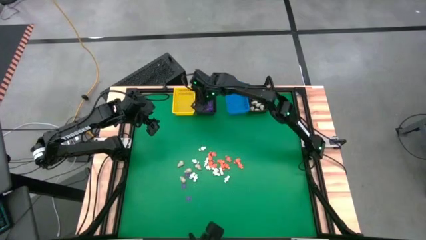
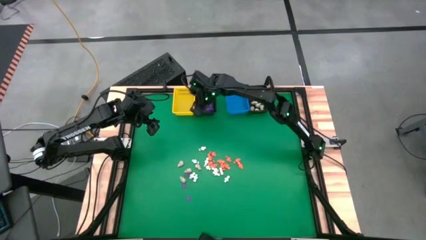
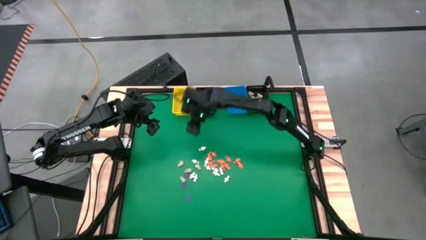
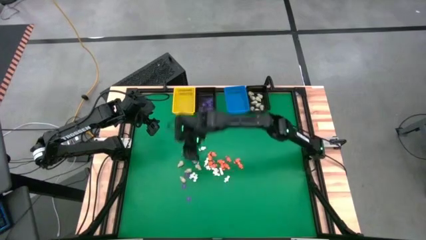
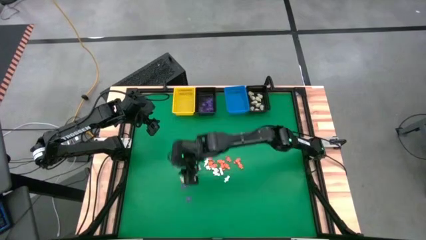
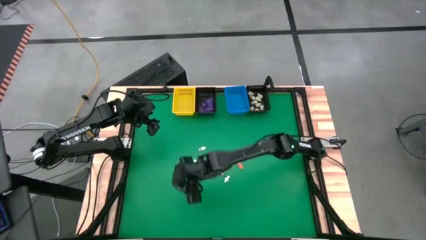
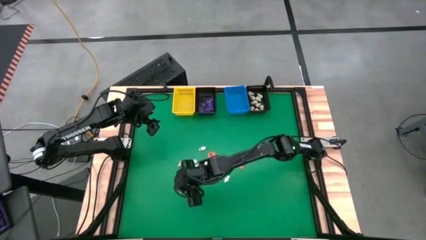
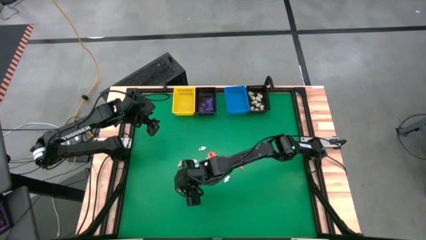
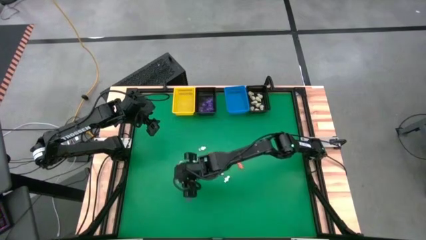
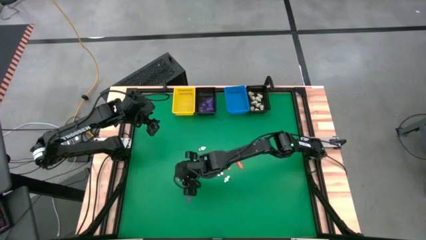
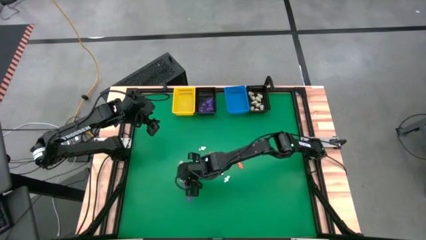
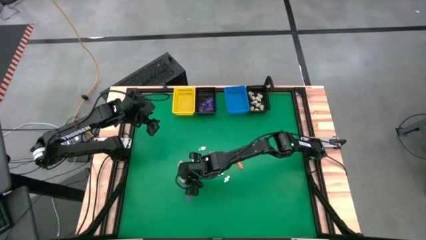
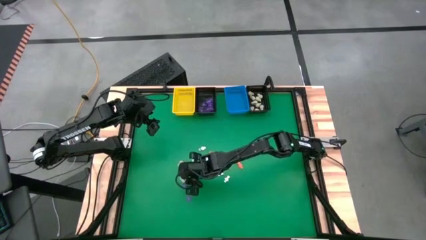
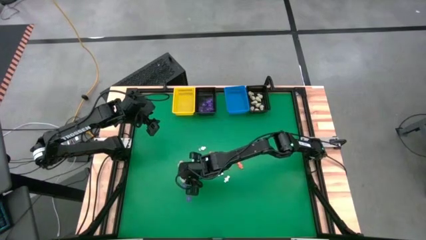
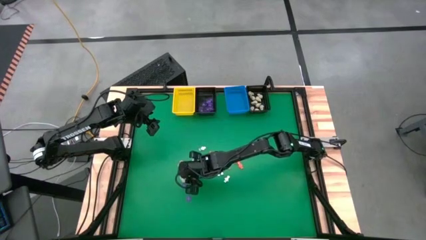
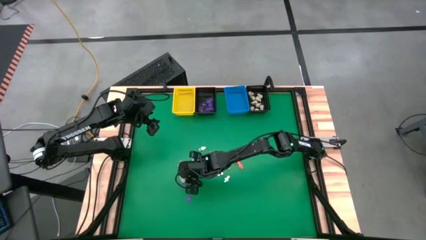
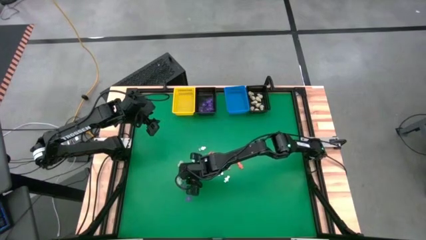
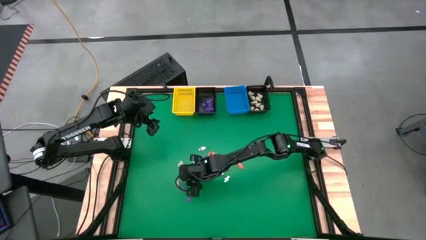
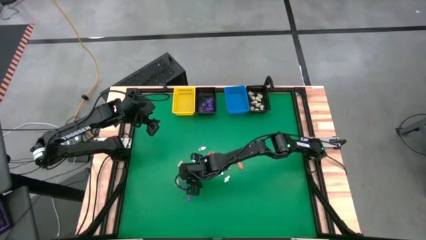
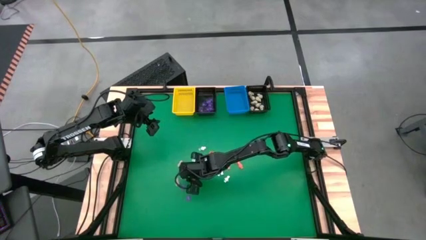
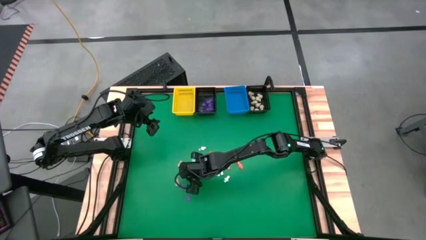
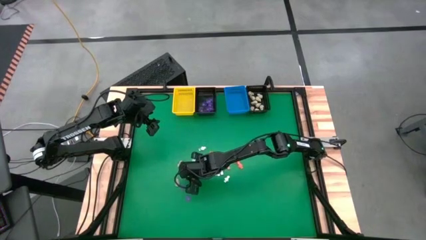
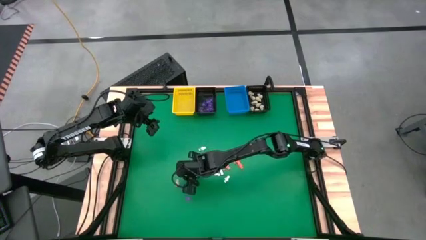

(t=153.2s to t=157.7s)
Task: Sort Halloween decoration
Put the purple spider toy into the left black basket

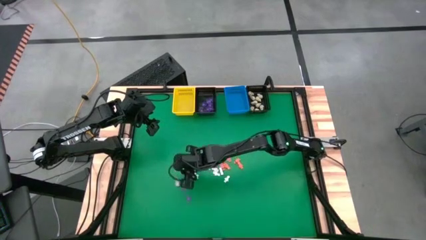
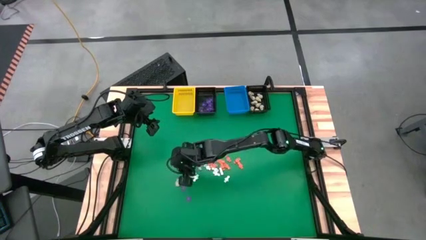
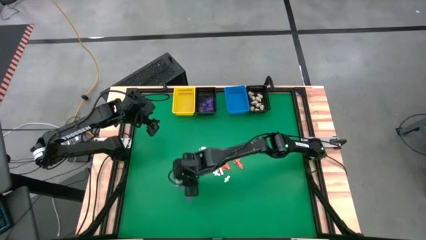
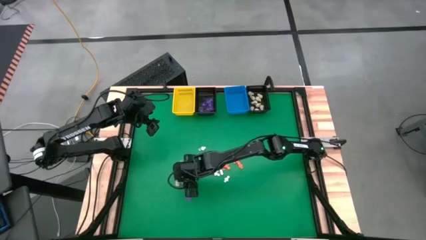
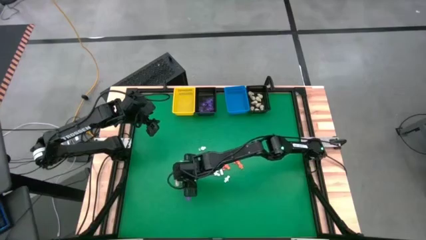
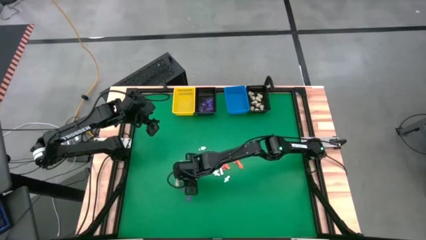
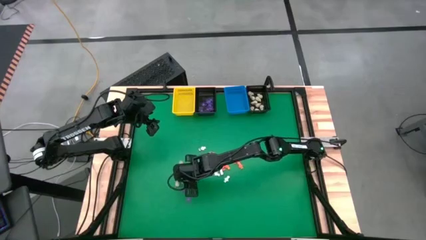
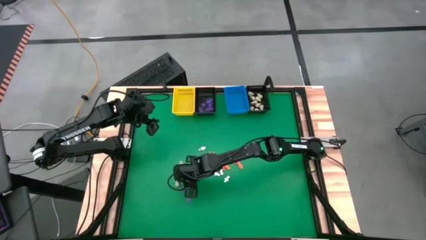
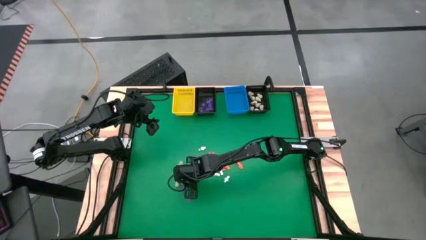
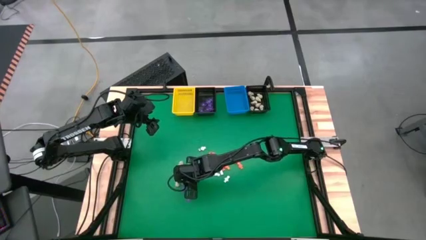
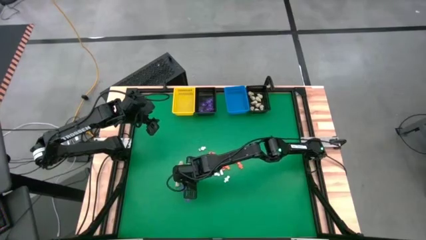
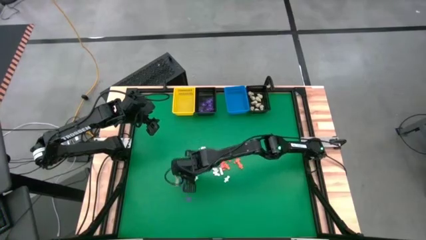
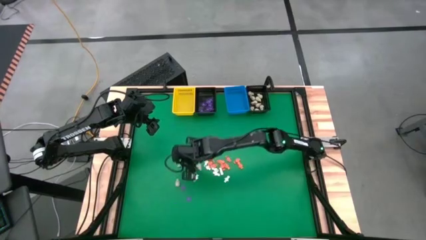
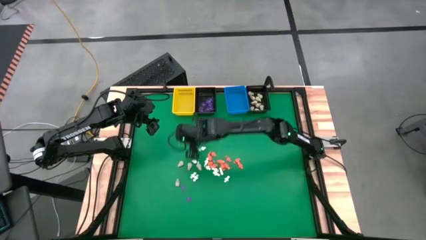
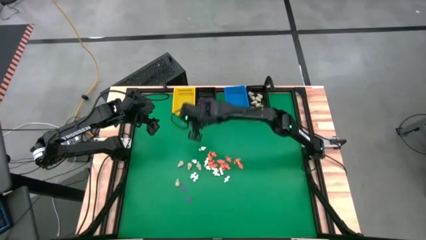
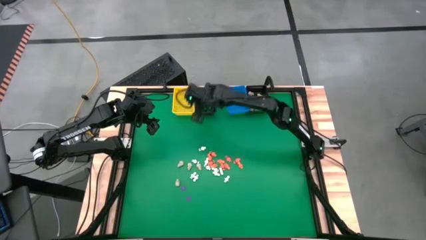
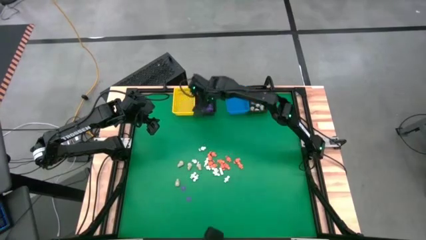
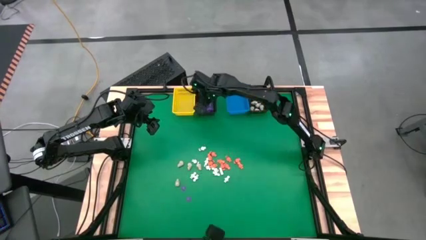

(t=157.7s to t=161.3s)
Put the purple spider toy into the left black basket

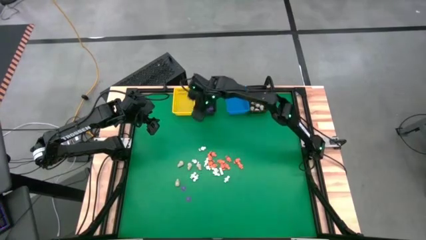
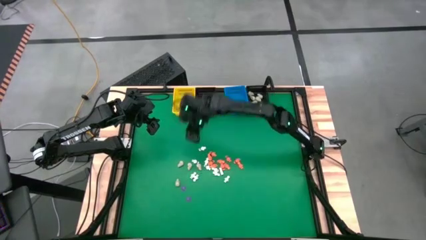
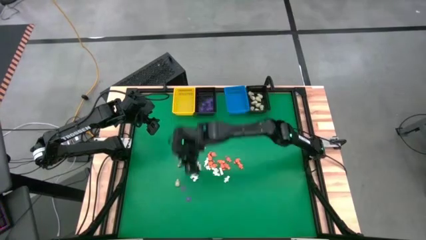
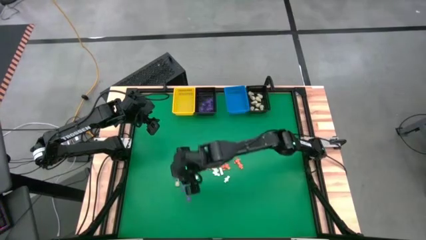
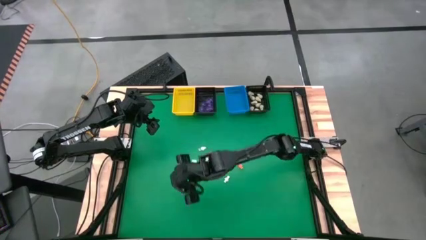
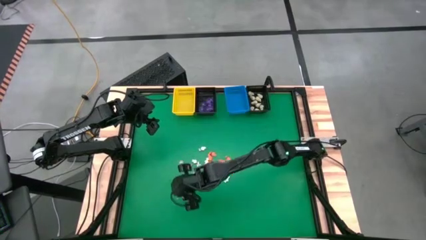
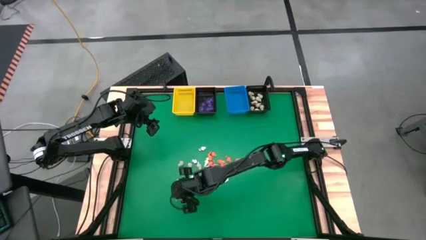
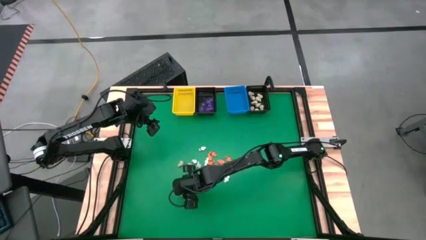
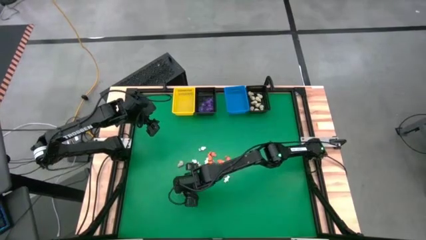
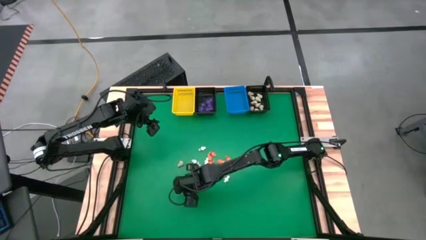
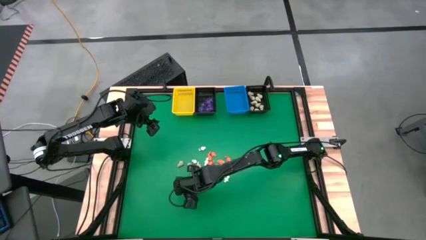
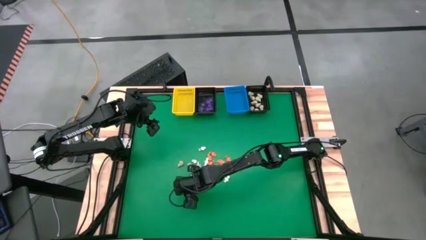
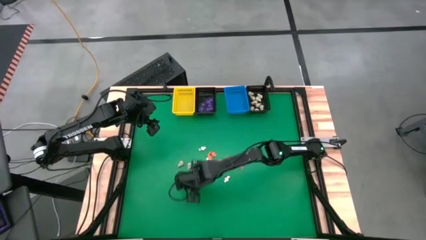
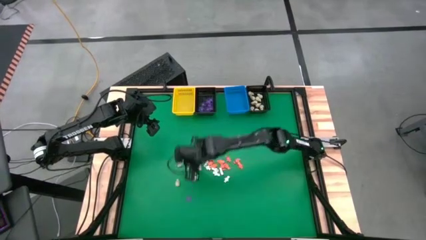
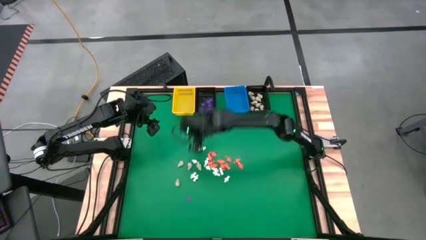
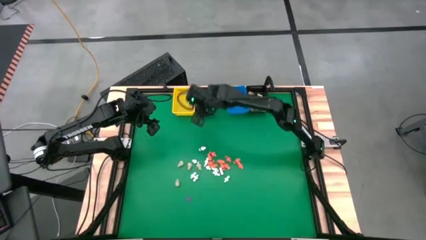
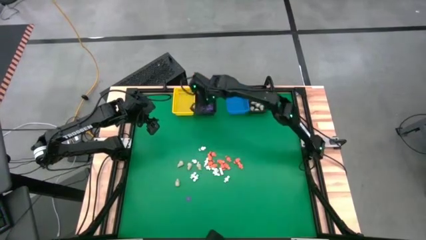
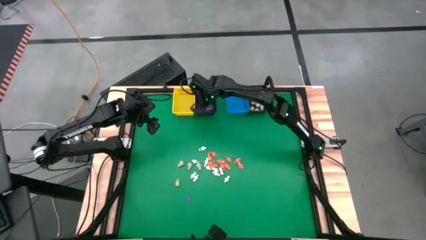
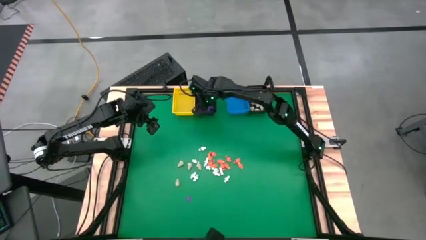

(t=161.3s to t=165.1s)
Put the purple spider toy into the left black basket

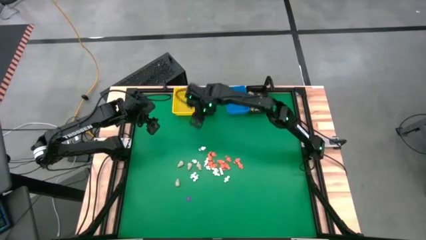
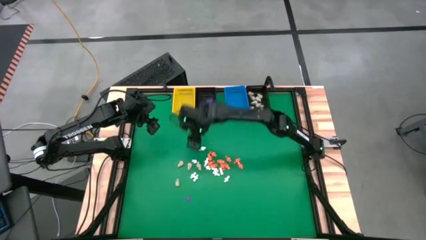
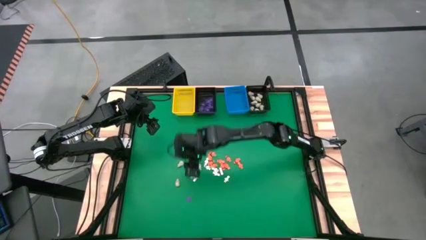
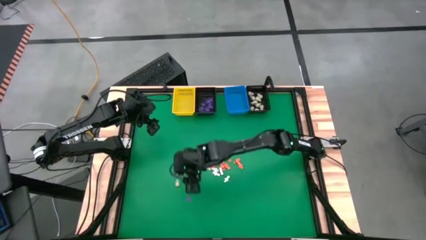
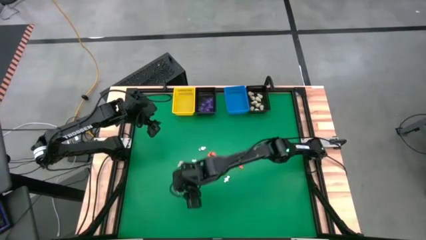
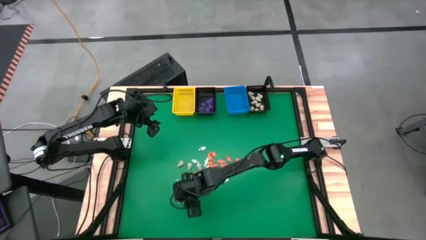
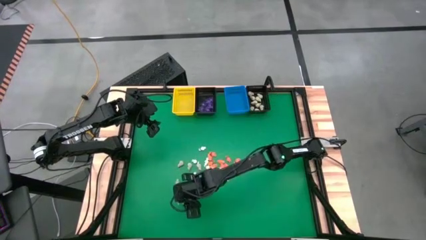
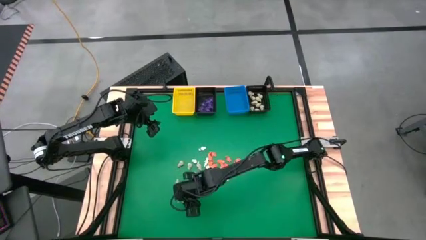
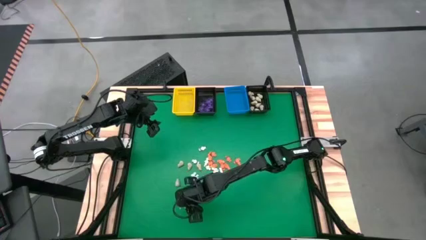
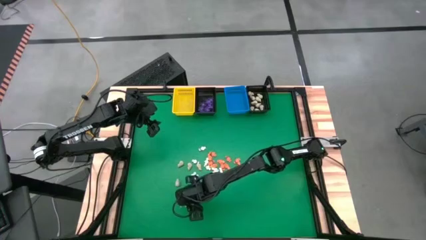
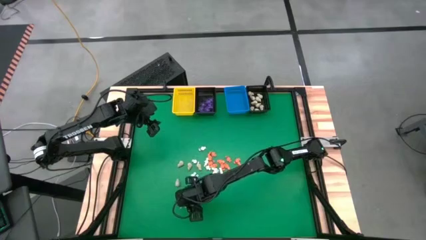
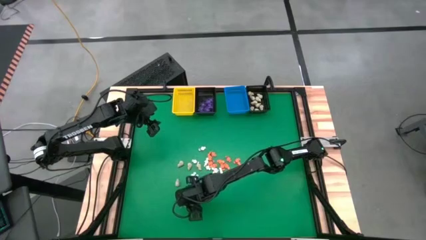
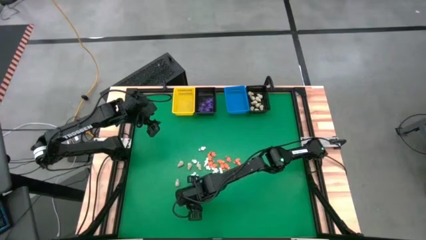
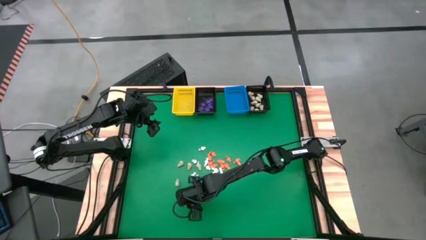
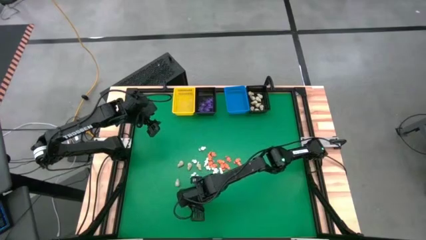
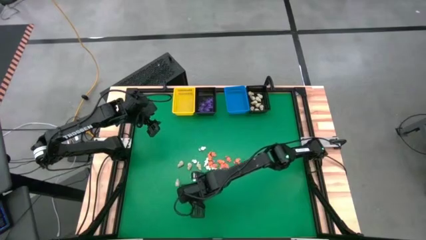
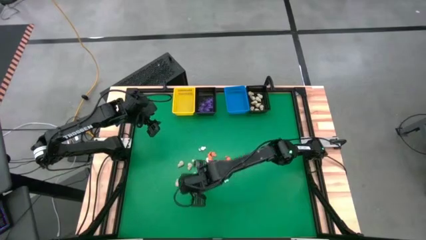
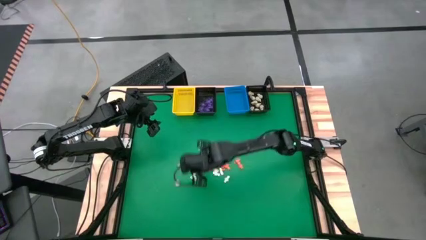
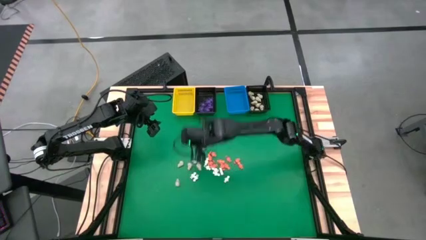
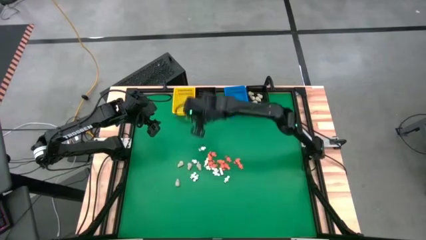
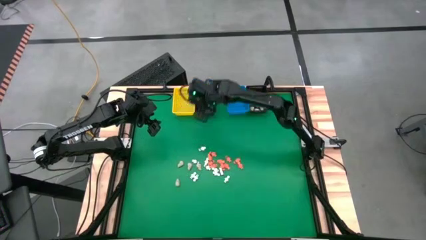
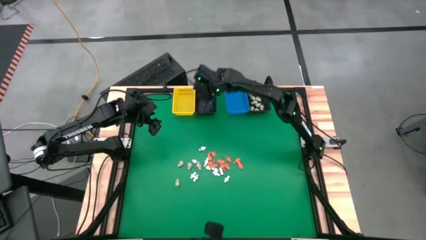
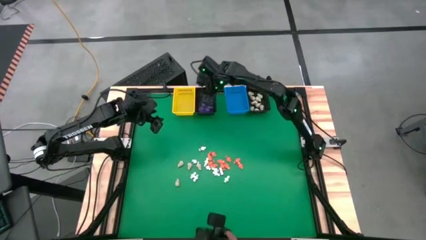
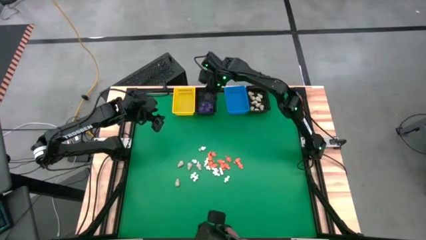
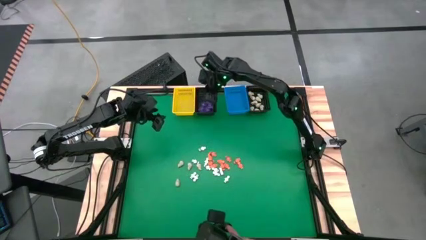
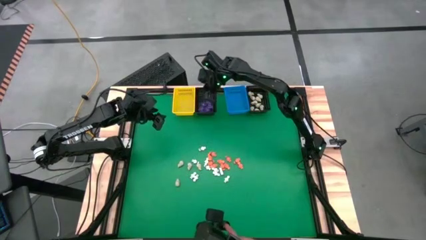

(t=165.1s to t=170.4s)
Put the purple spider toy into the left black basket
